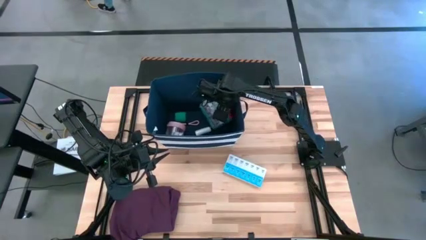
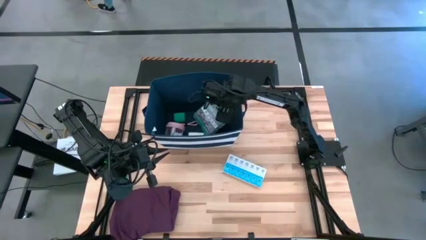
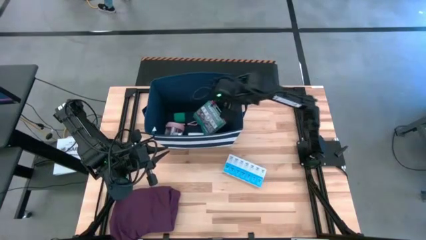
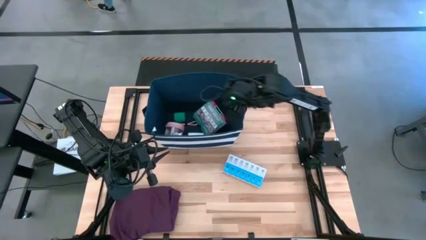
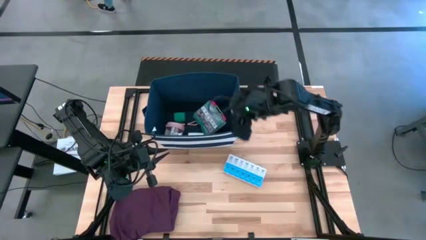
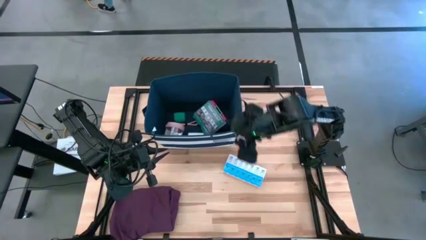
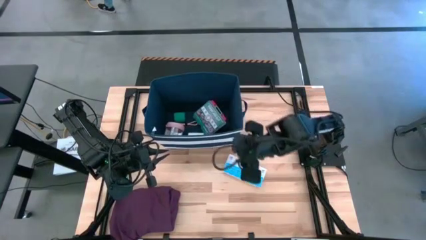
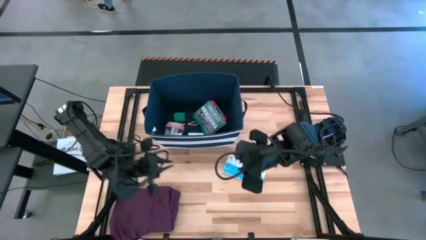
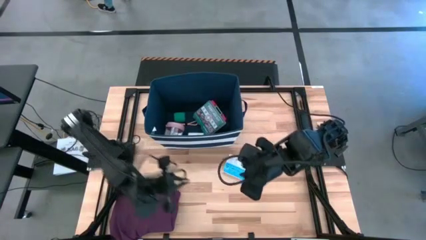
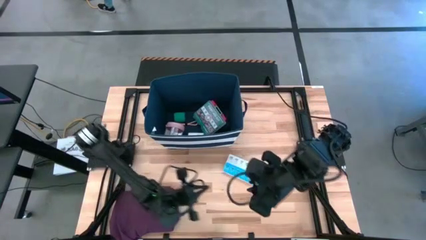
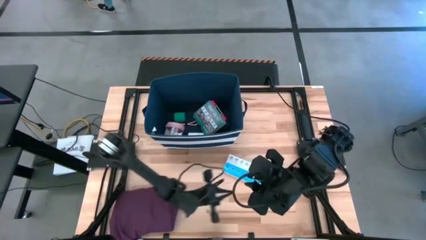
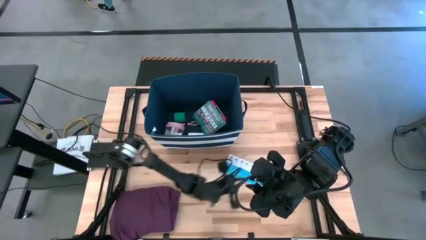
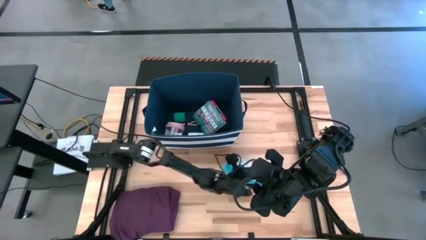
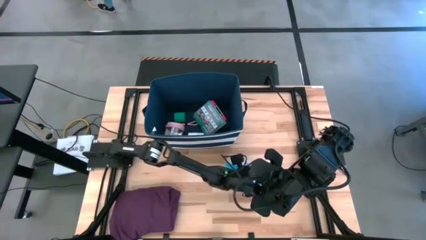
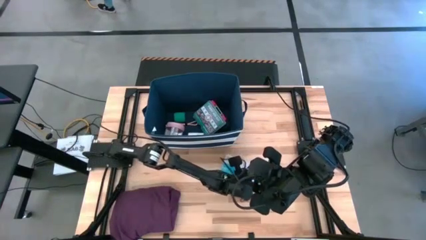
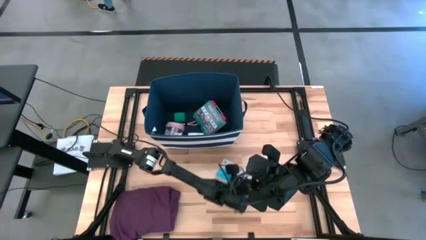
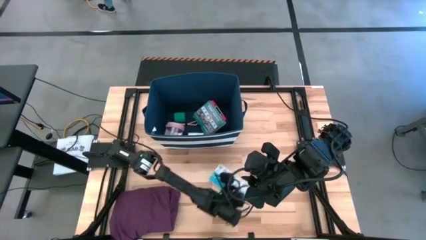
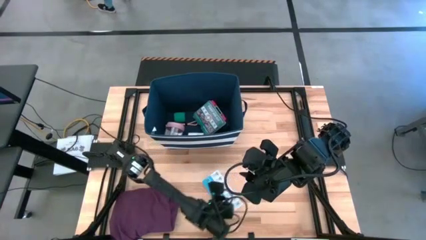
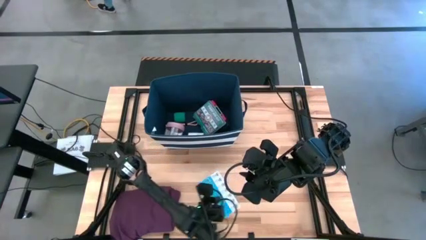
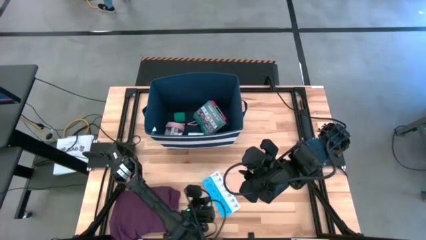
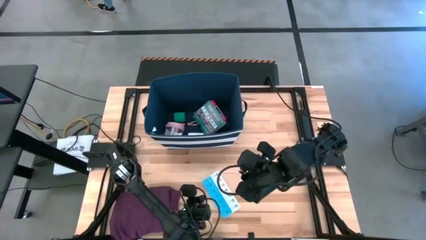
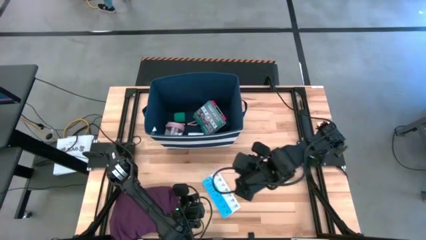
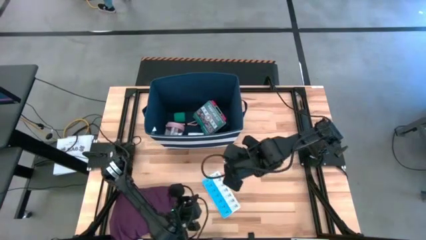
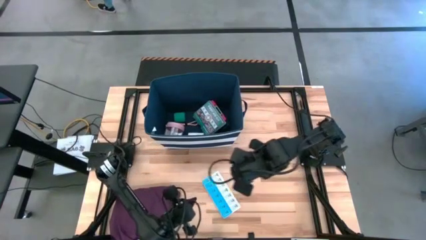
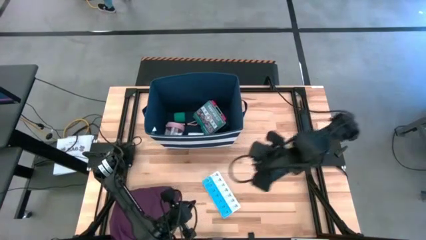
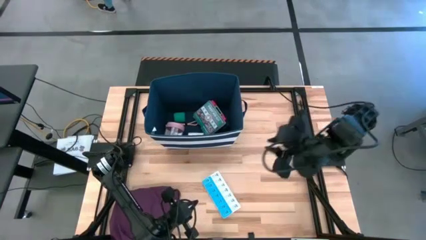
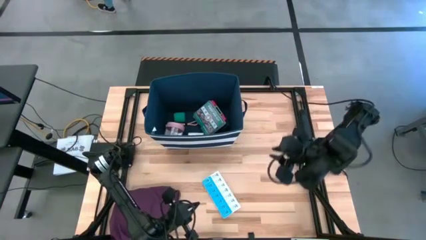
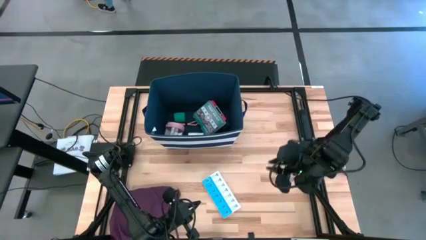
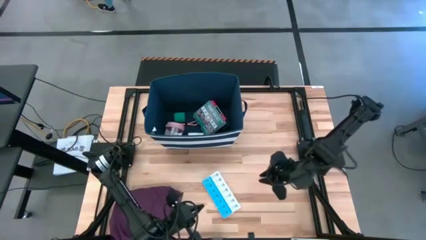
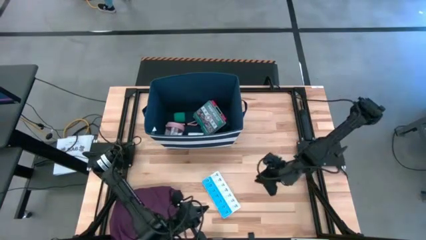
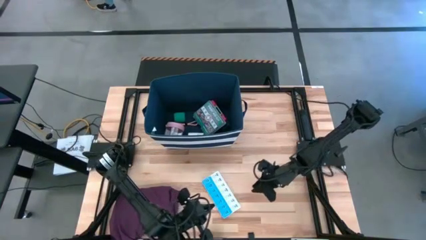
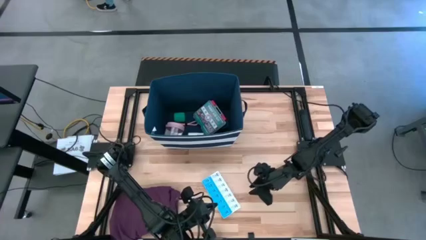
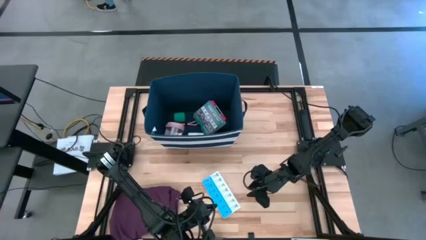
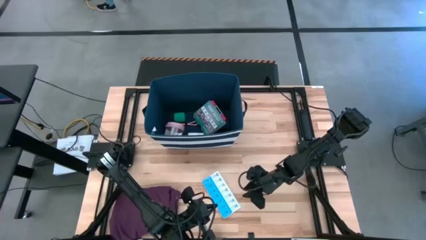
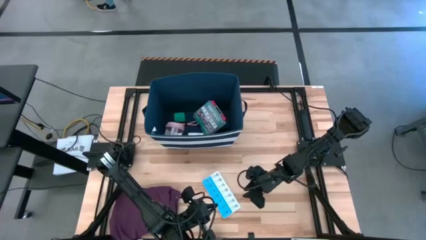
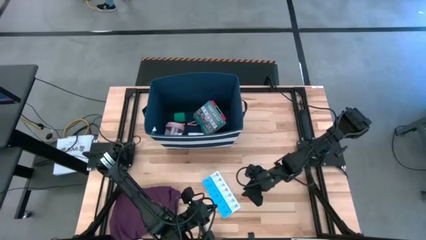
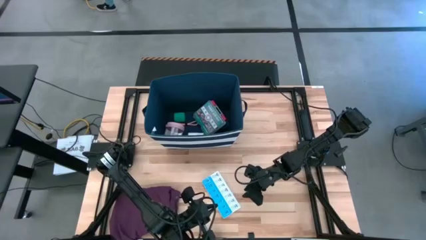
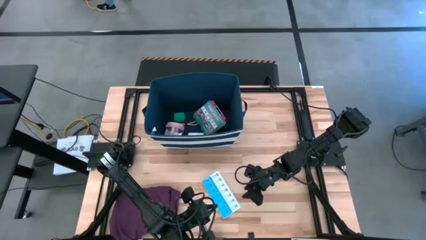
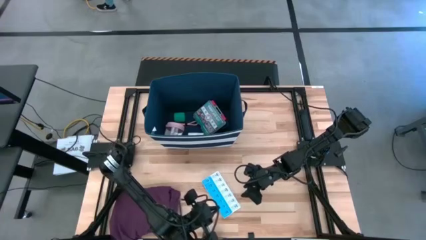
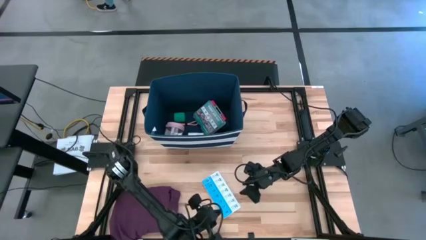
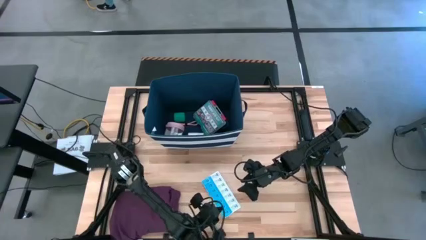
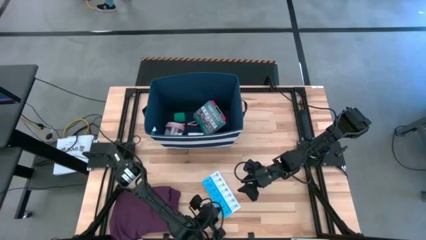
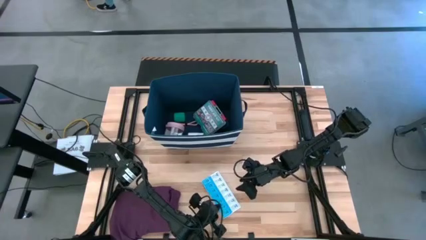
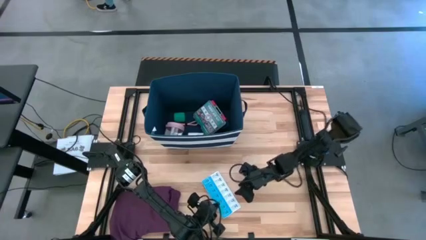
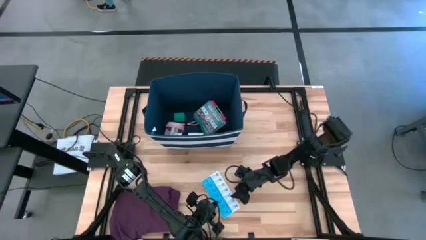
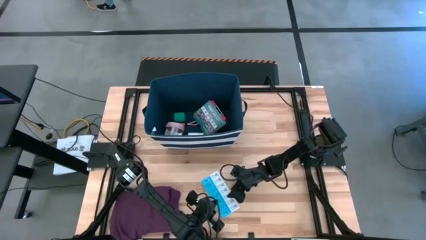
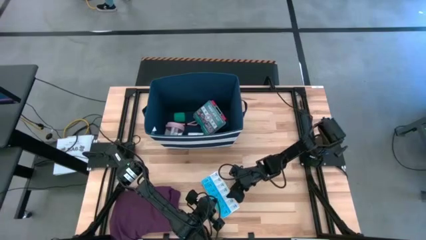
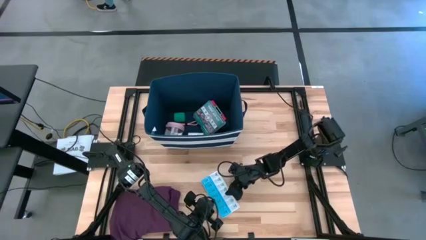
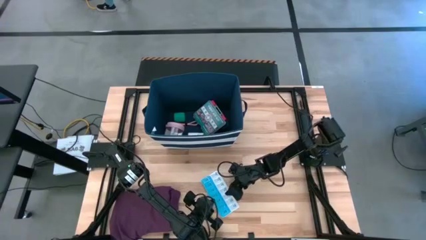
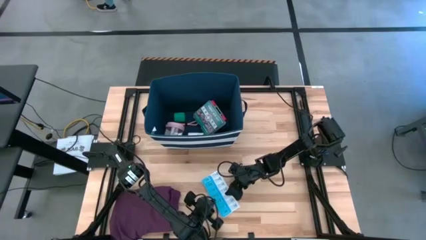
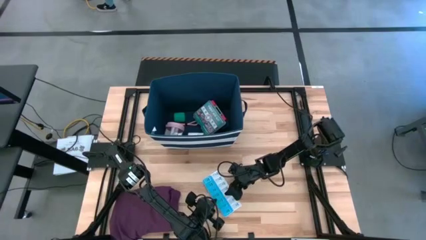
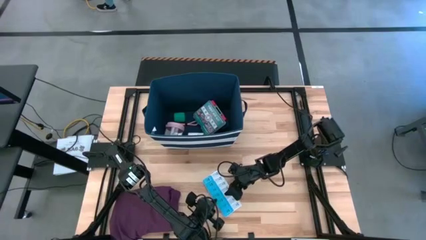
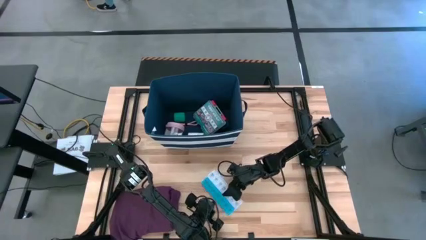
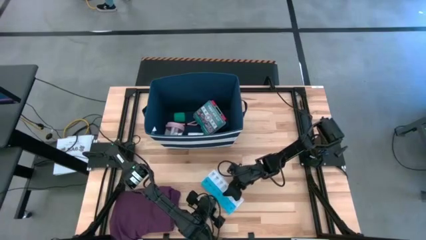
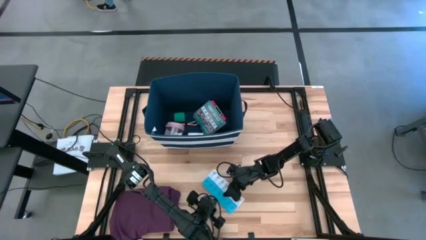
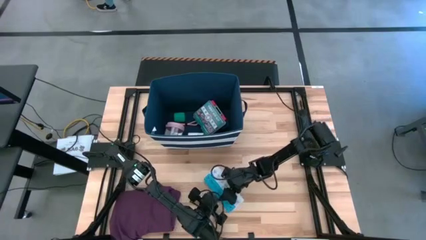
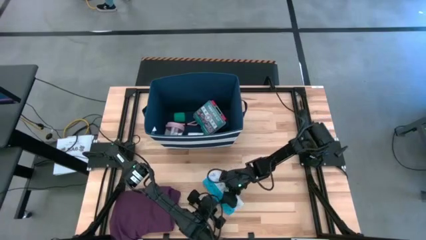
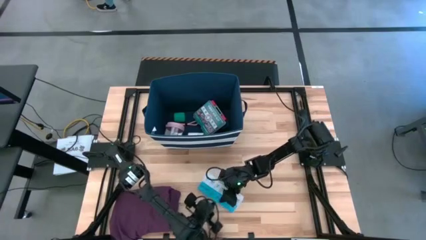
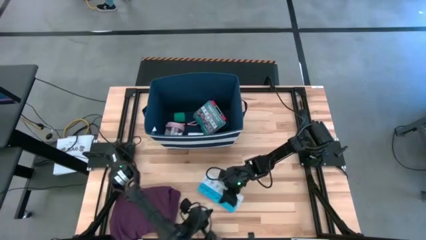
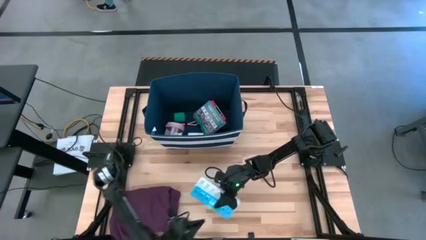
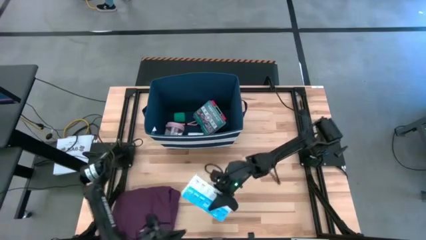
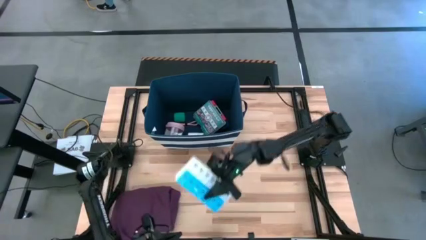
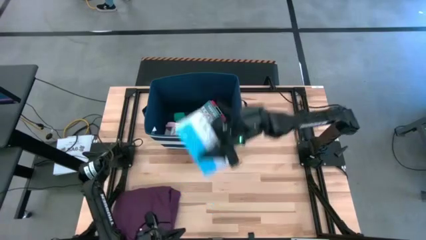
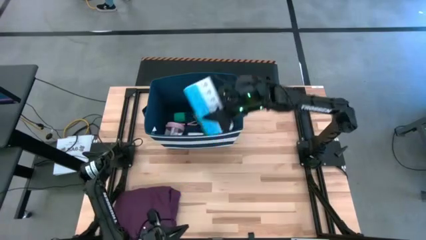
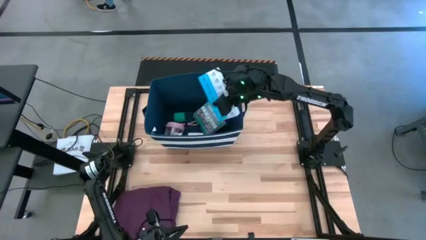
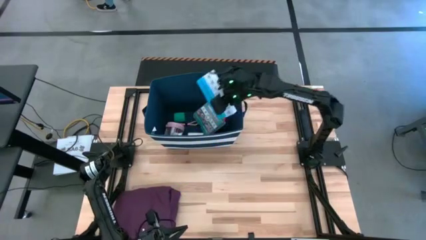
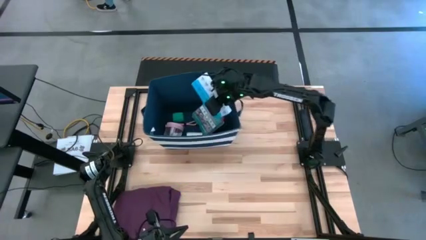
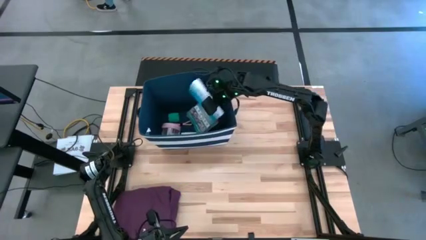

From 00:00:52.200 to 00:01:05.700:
Task: Pick & place medical supplies in basket/bin
Put the blue pill organizer into the blue bin

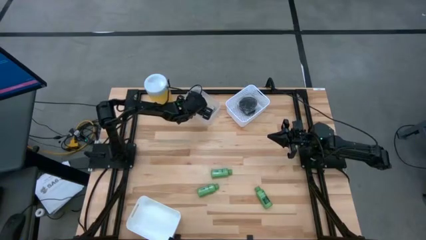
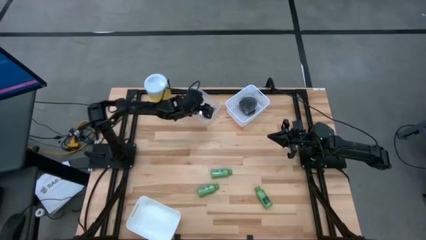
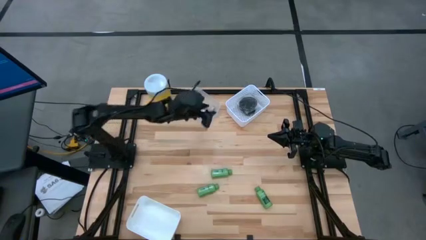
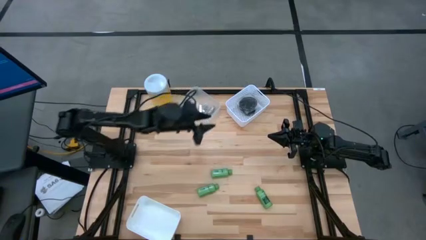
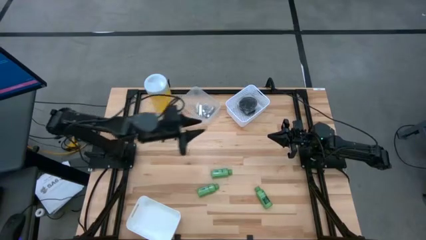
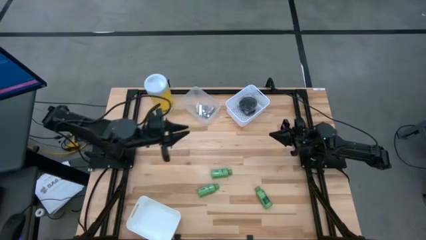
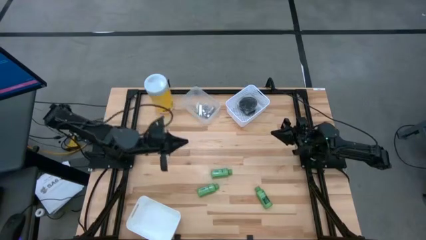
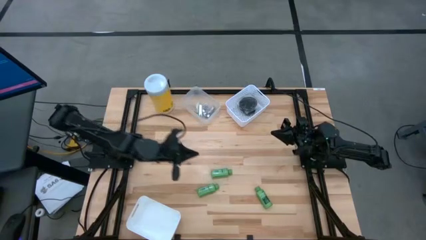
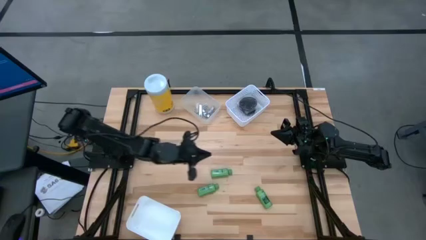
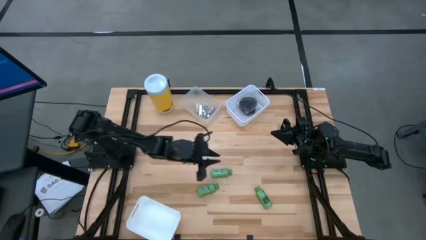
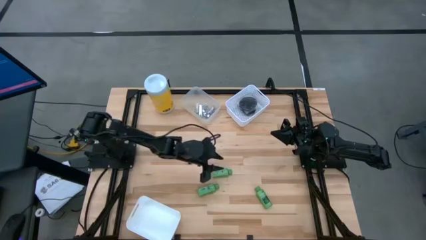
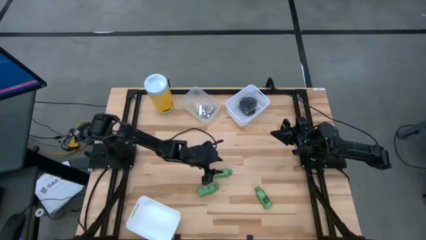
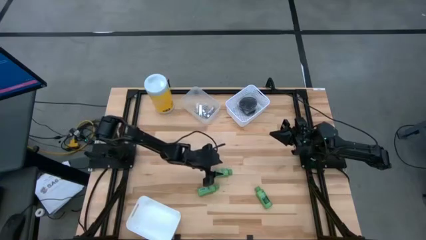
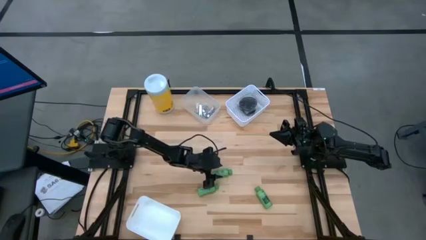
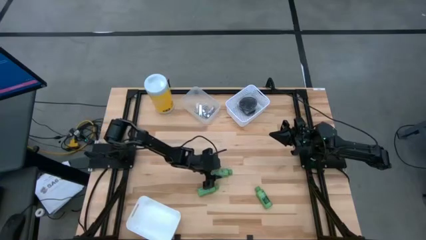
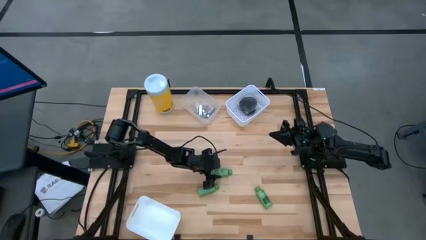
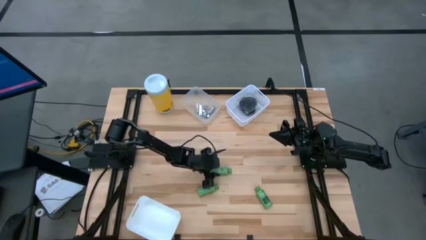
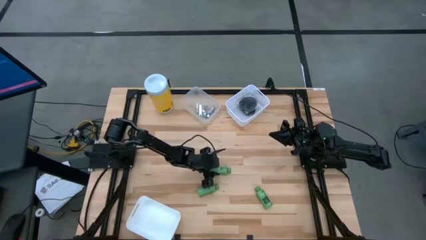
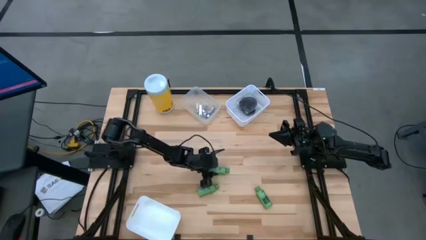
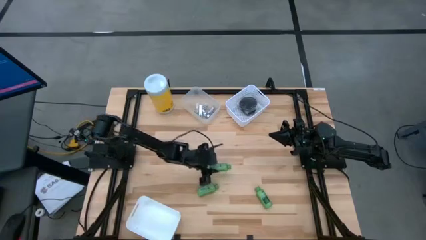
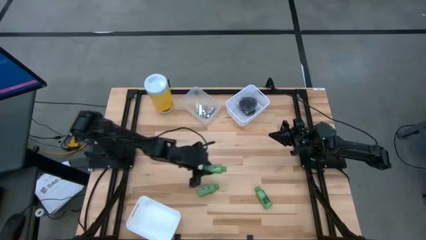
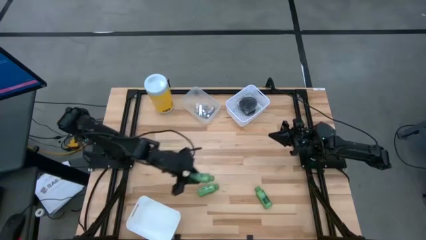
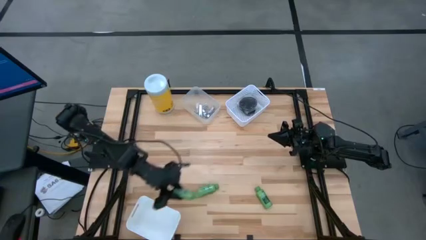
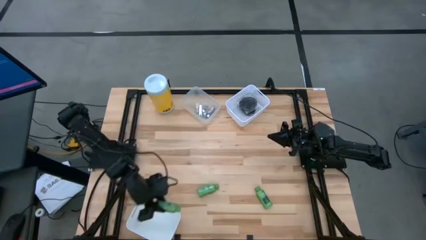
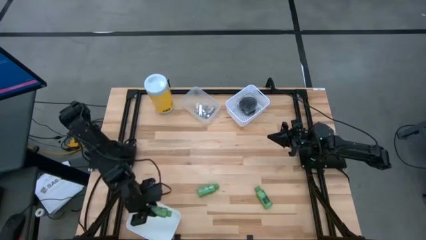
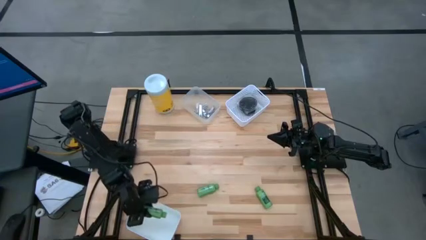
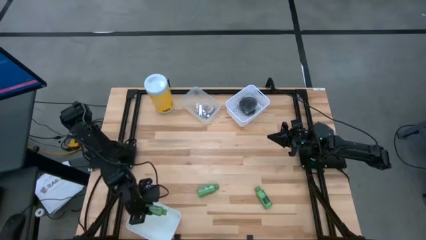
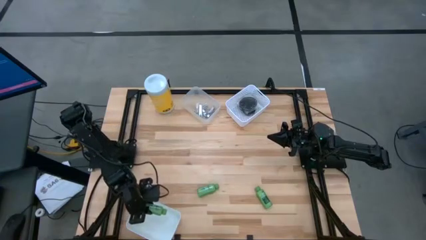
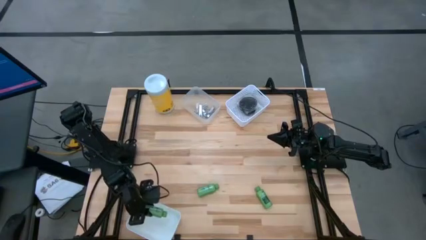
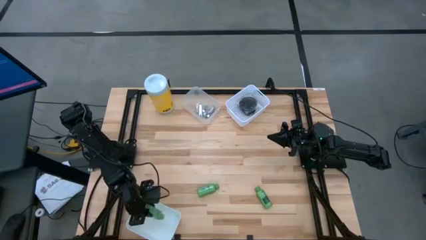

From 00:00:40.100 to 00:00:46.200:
Task: Pick & Place Travel size toiletries
Put the green shampoo into the bottom white bin
